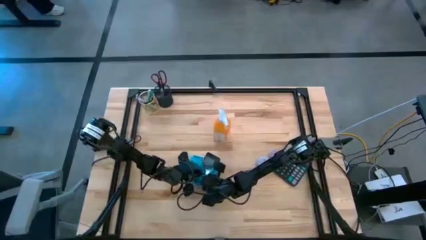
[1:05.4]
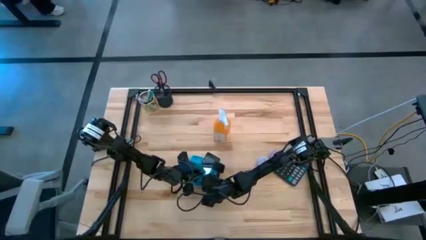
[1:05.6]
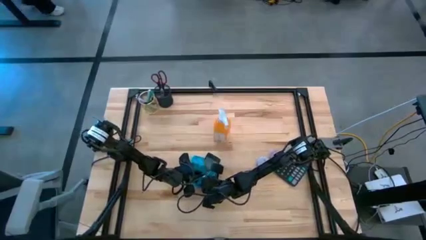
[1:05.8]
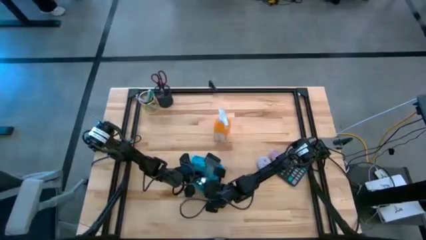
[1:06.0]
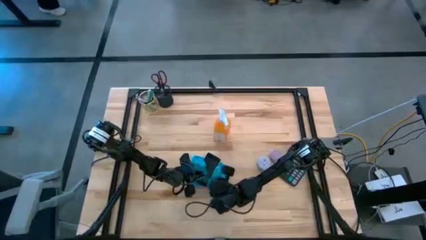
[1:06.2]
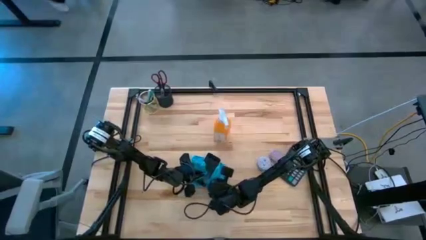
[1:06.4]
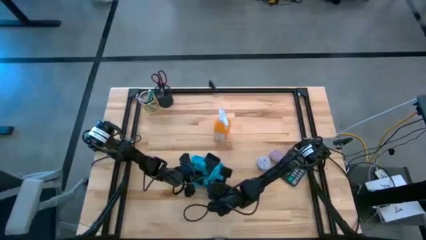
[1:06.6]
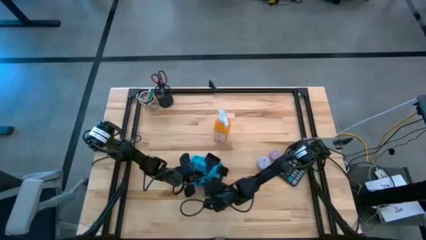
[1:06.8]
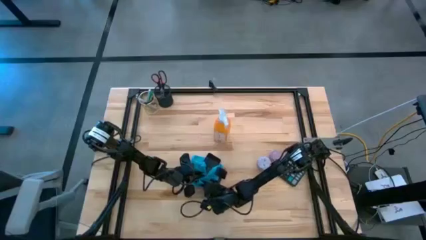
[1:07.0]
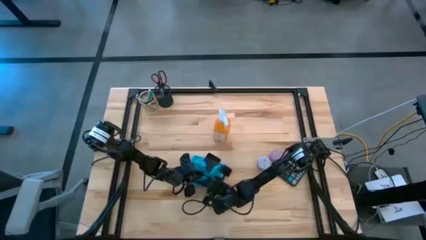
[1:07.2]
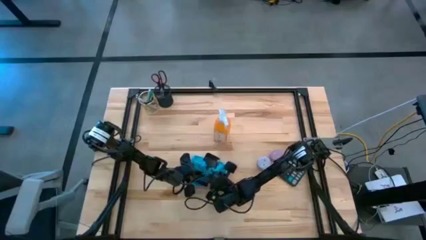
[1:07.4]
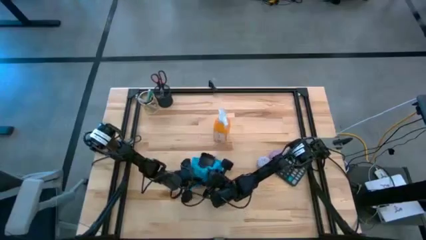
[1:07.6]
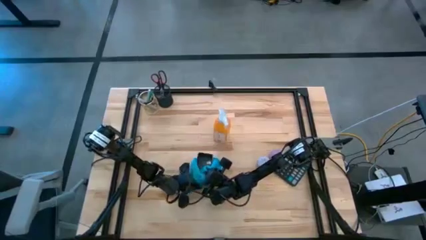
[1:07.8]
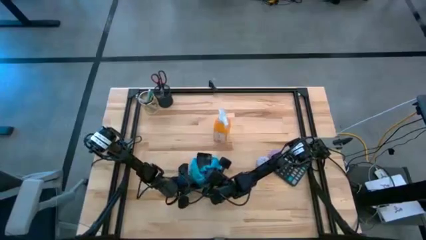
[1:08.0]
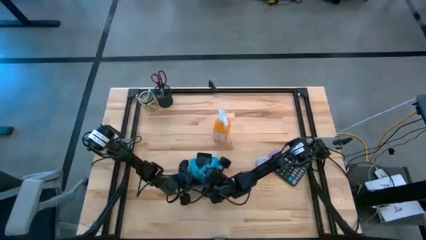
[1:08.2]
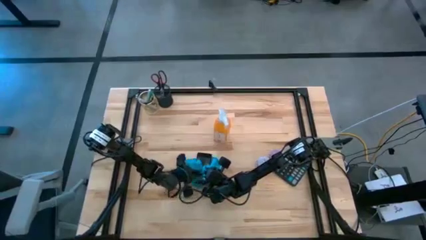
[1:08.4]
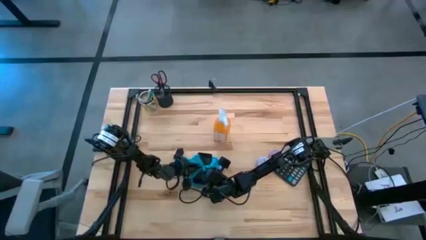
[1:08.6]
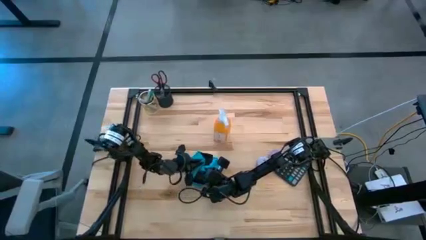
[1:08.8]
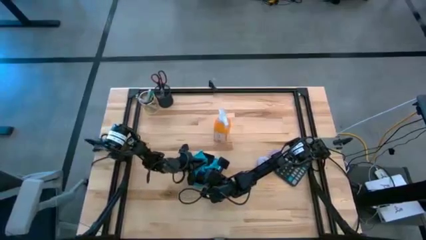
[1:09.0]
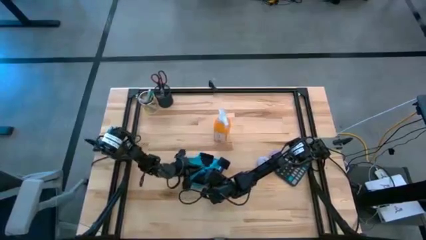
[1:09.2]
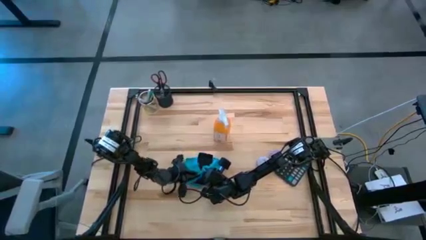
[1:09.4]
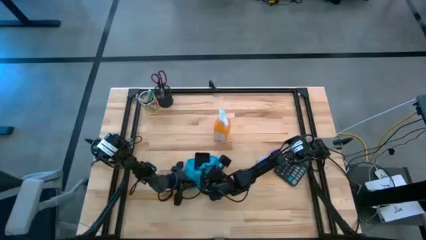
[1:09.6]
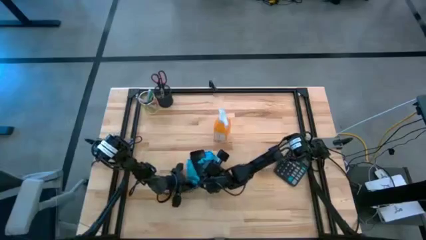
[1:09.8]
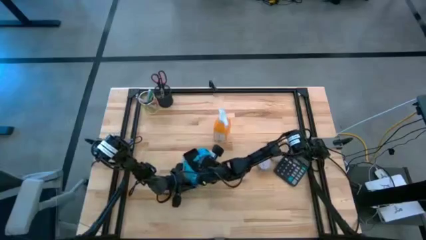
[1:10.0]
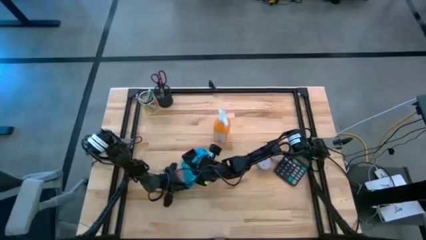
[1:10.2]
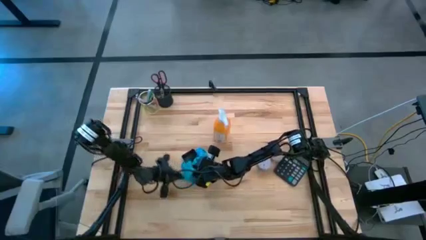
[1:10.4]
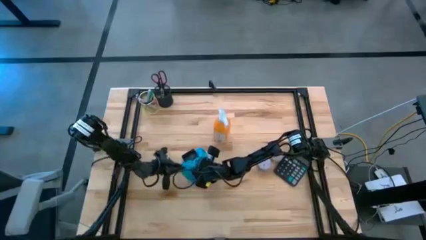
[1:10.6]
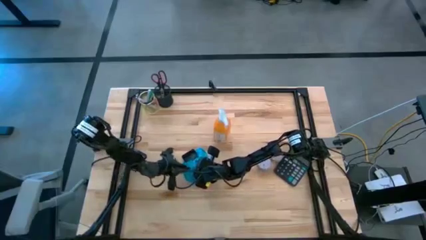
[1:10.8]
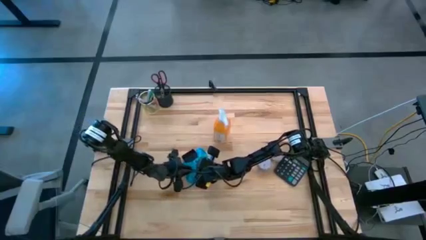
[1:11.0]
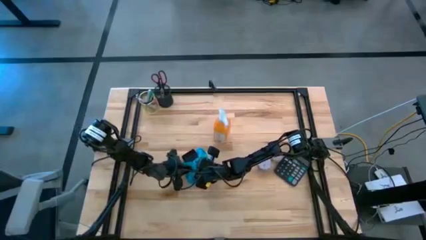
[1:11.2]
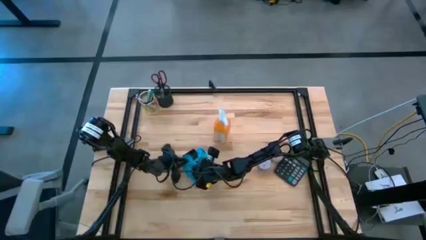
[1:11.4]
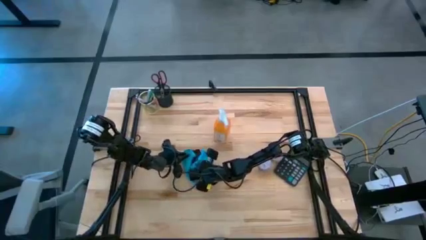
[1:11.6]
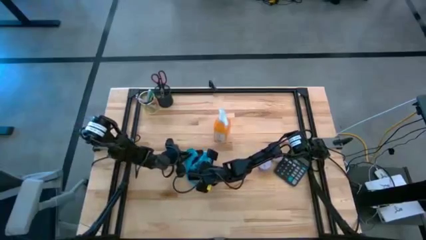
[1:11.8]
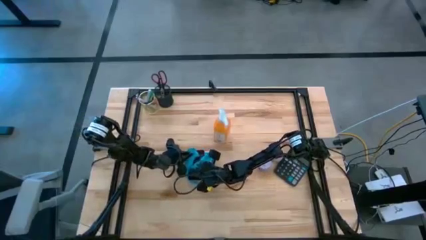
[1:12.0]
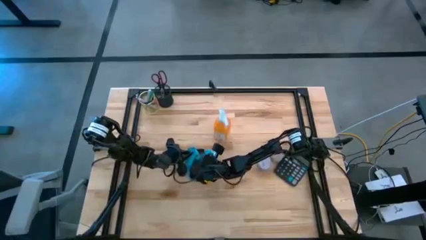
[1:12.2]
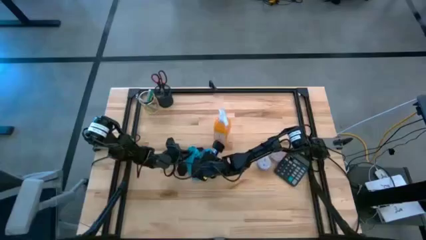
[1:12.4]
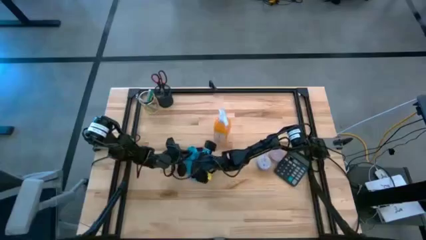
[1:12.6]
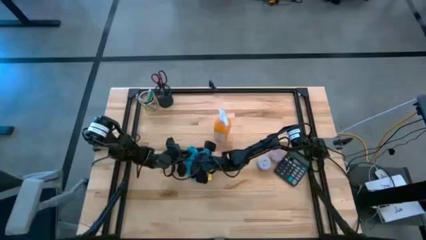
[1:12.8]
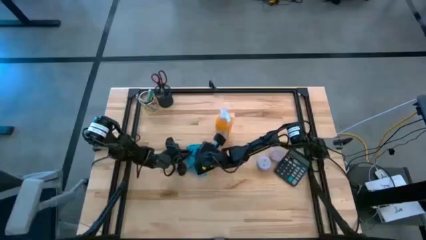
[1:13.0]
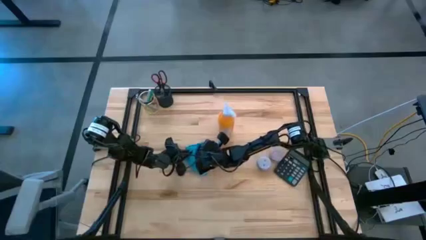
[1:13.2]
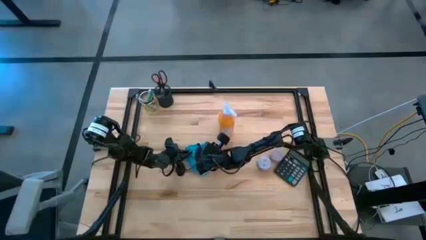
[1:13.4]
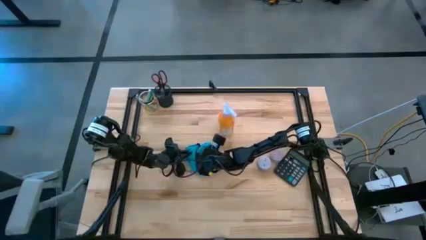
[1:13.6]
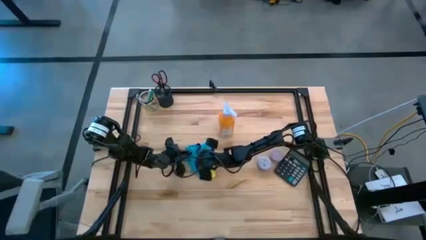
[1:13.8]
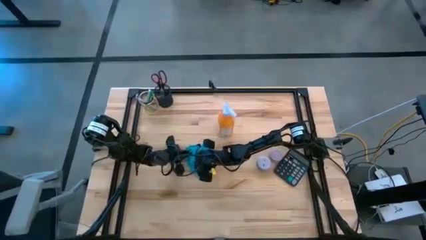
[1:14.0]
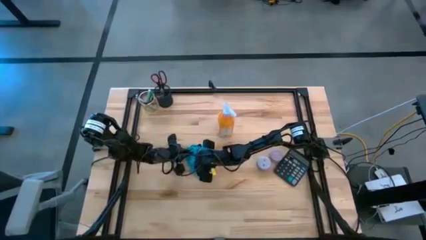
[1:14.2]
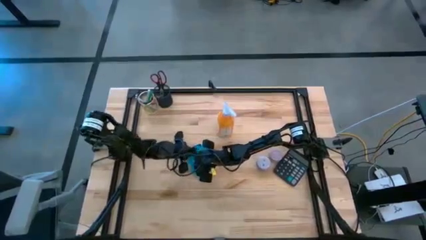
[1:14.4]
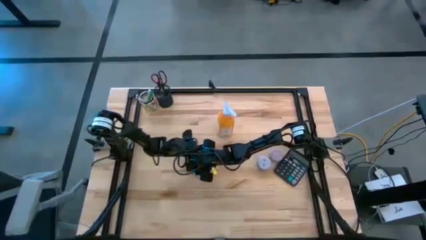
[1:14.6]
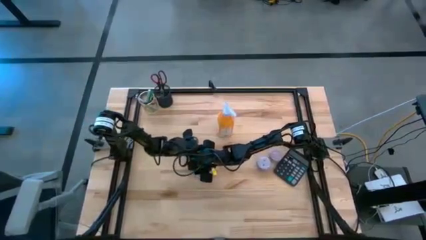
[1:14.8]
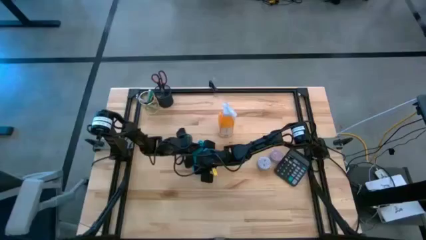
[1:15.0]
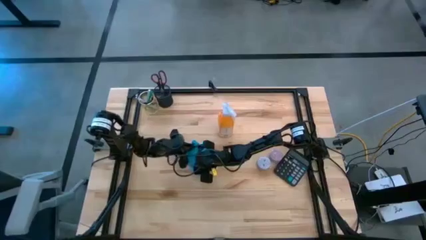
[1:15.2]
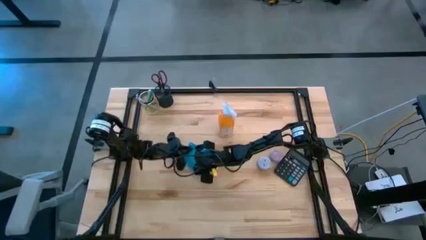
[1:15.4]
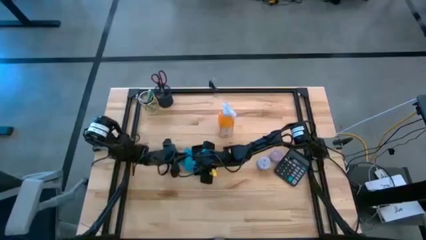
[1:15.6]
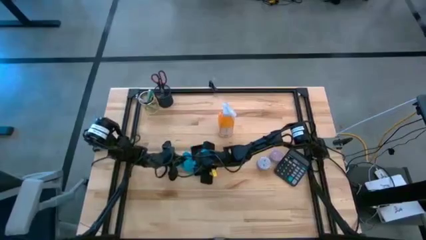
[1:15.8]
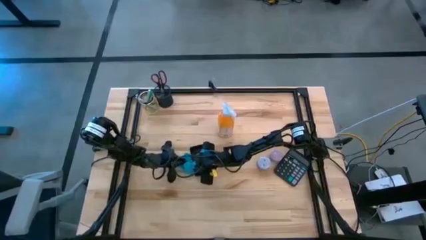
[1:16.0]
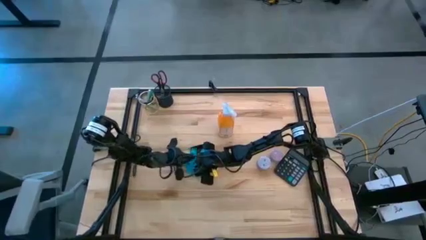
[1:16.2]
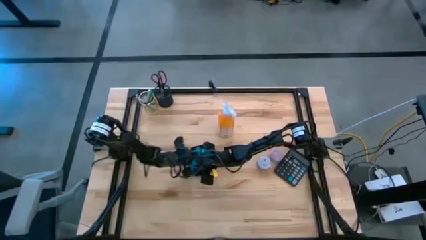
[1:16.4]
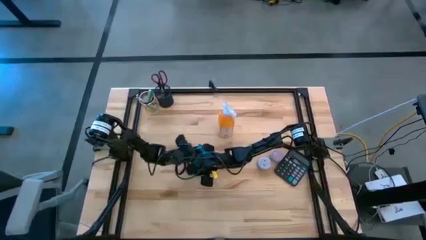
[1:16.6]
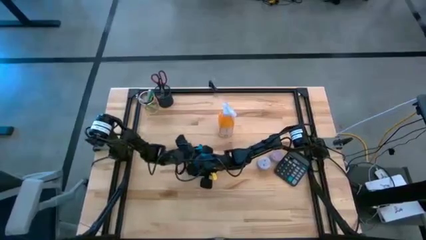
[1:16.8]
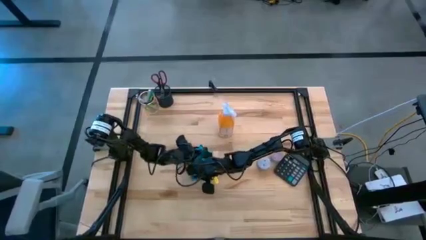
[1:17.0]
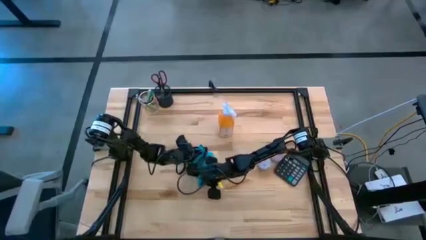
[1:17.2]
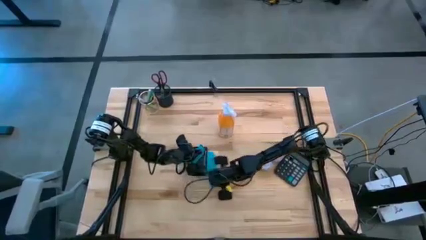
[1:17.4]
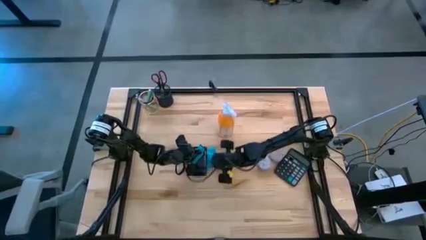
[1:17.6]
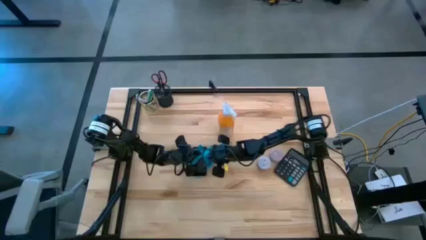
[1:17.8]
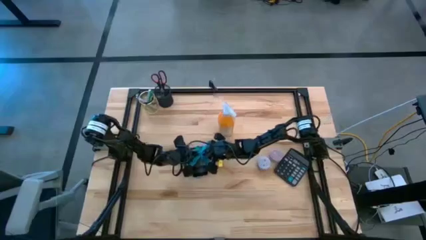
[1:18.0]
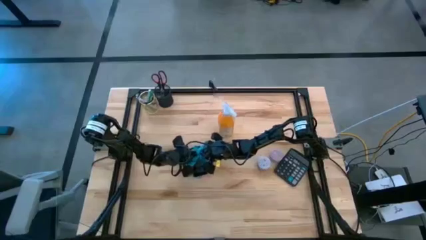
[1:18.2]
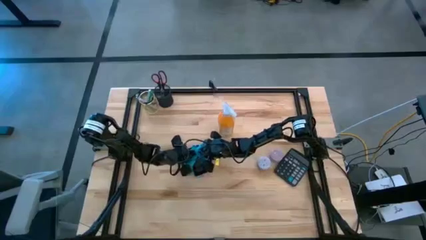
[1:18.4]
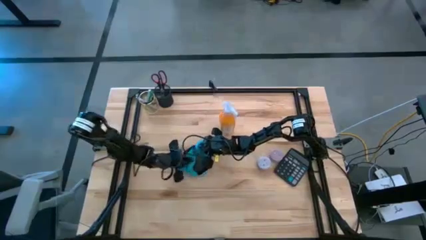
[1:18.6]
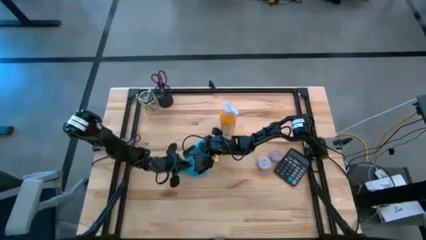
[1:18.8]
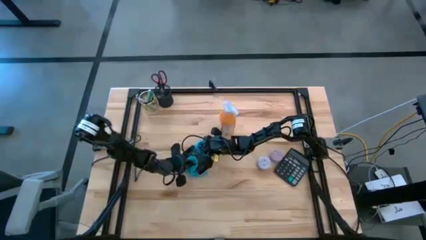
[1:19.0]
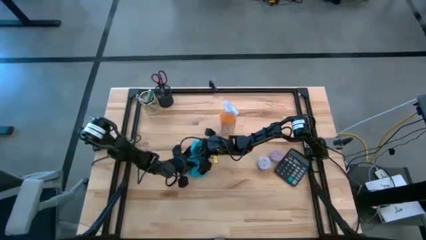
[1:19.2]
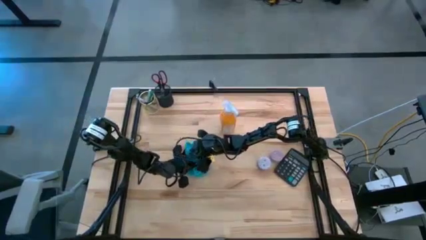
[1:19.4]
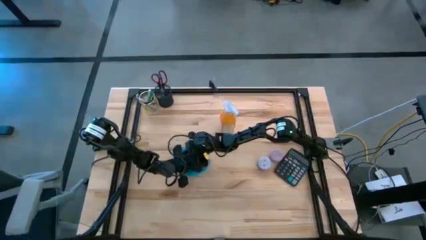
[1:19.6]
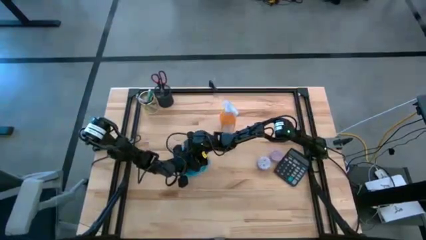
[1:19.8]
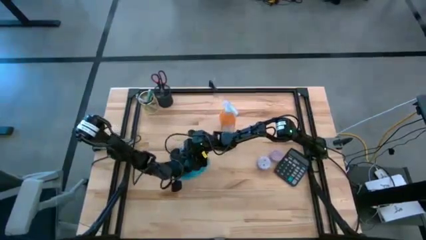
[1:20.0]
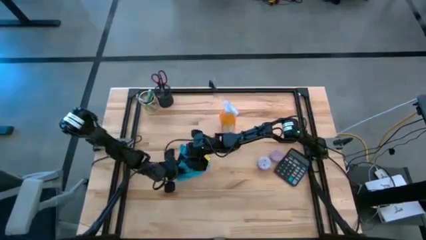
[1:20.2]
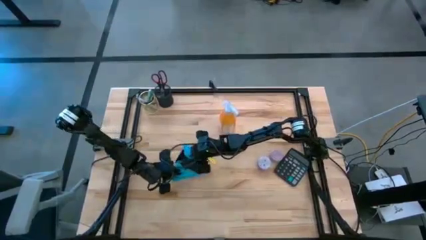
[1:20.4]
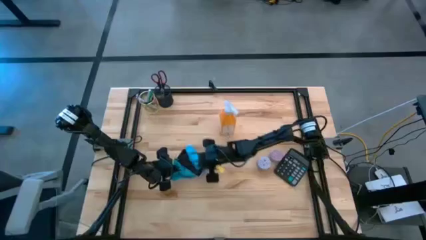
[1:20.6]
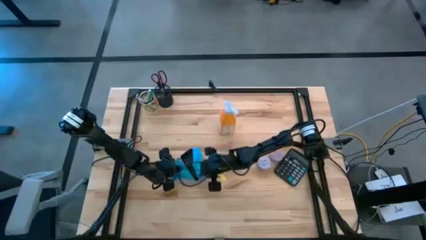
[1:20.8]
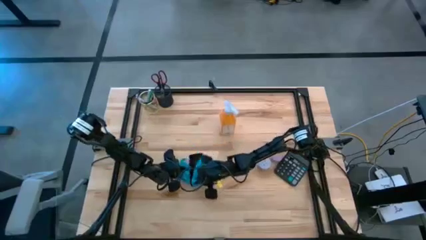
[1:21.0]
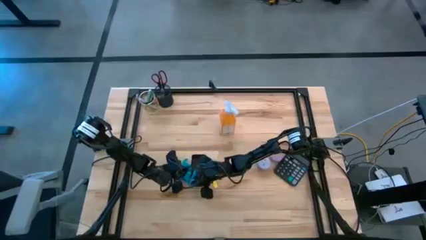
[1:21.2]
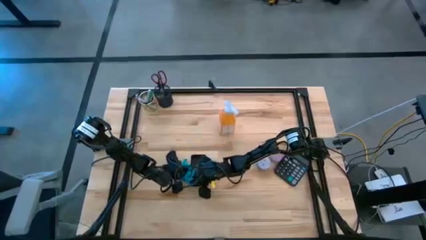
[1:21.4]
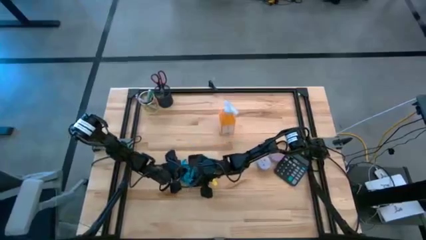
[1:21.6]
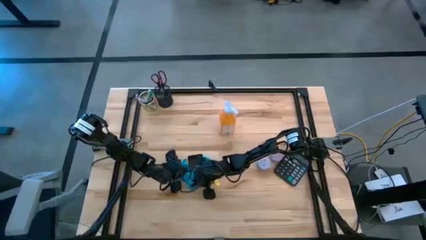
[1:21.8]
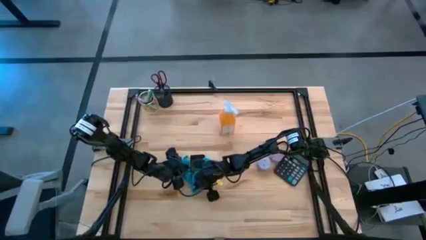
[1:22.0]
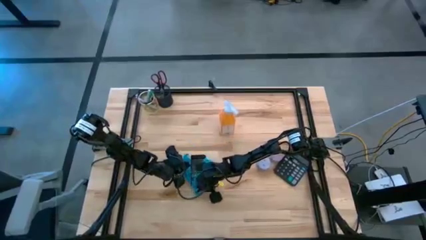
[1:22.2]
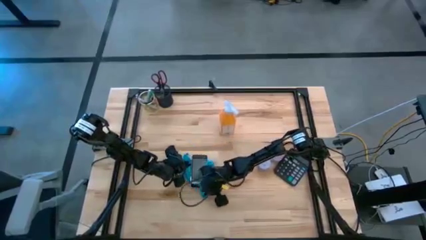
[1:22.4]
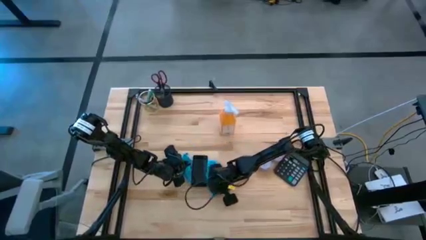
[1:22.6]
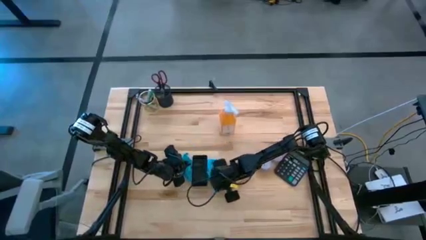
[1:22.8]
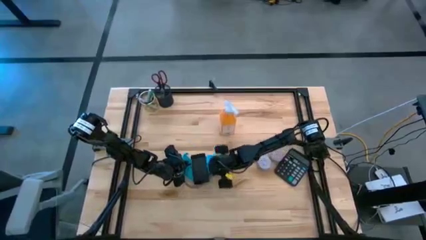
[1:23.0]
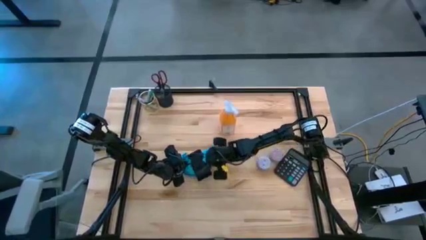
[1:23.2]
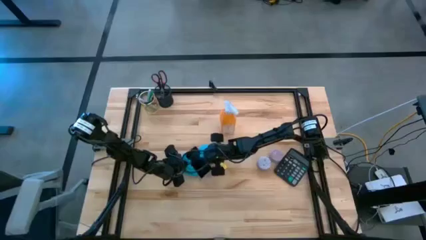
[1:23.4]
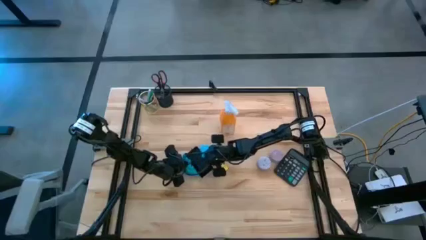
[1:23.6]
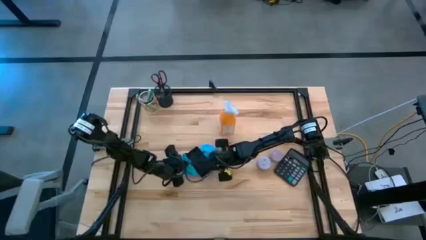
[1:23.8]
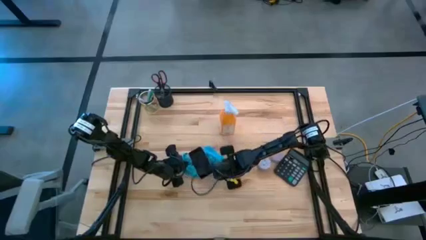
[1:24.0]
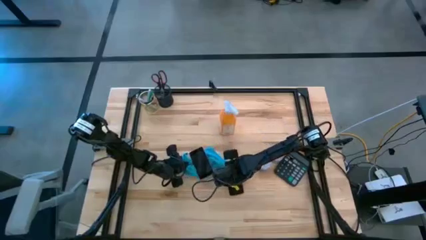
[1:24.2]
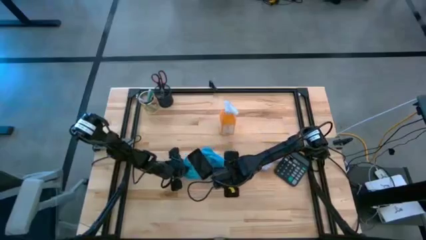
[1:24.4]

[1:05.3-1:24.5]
Task: Apply microfiber cloth
Wipe the front and back of the cellphone using the blue microfiber cloth
